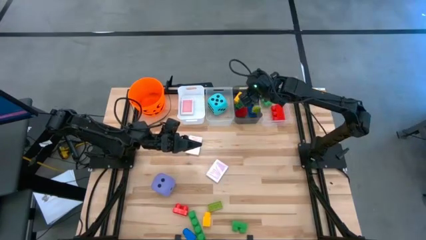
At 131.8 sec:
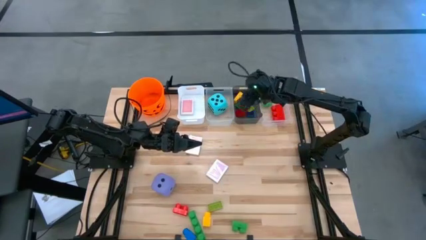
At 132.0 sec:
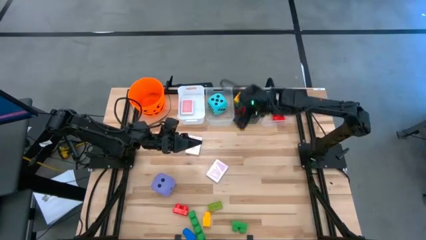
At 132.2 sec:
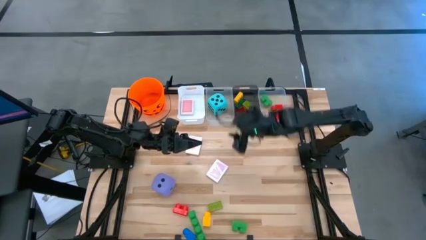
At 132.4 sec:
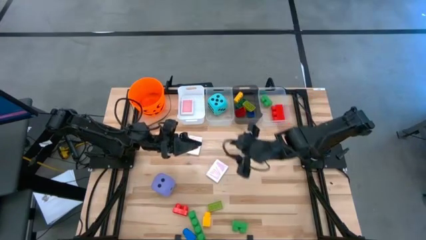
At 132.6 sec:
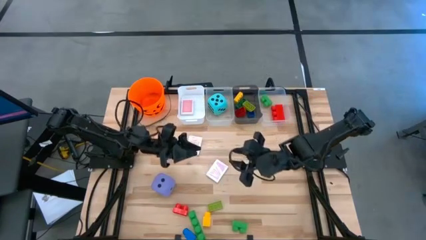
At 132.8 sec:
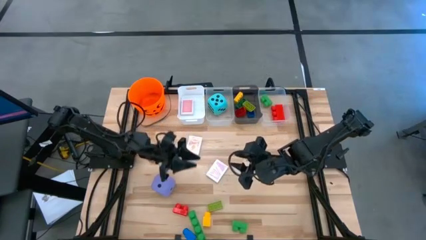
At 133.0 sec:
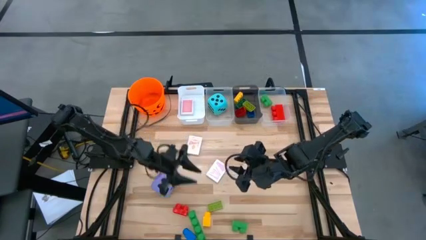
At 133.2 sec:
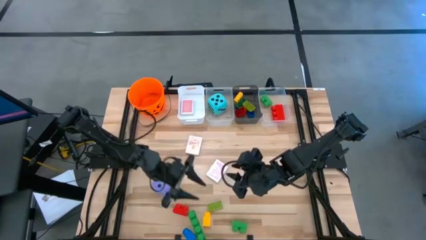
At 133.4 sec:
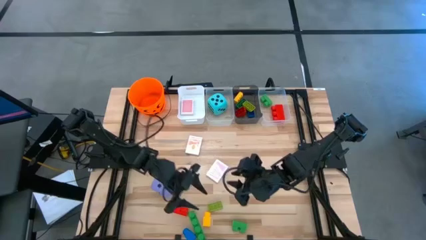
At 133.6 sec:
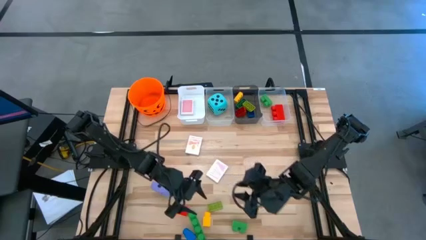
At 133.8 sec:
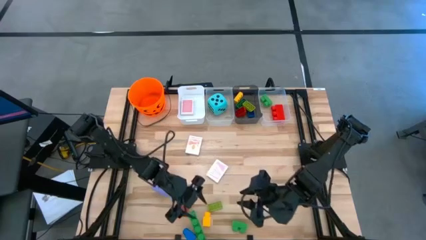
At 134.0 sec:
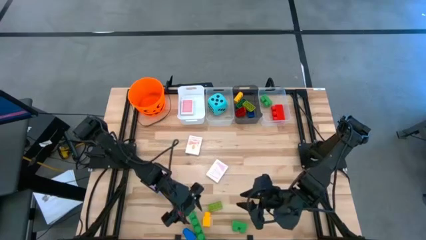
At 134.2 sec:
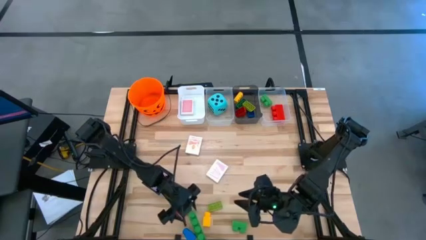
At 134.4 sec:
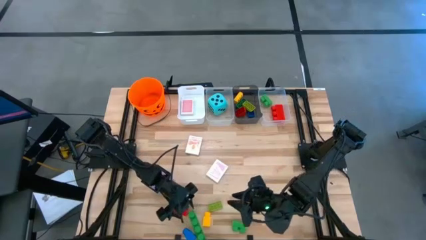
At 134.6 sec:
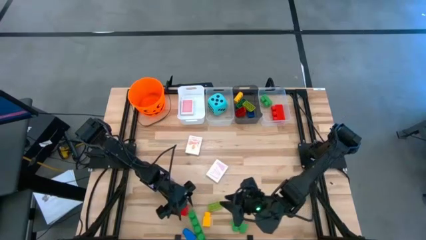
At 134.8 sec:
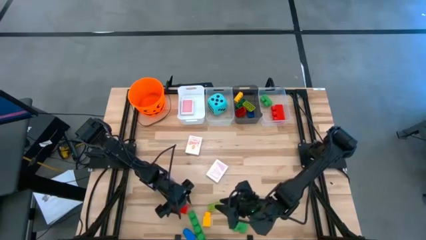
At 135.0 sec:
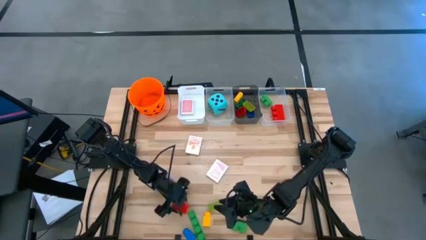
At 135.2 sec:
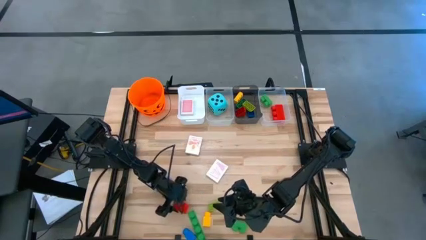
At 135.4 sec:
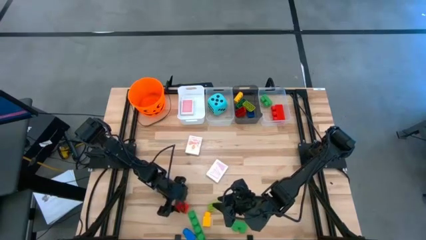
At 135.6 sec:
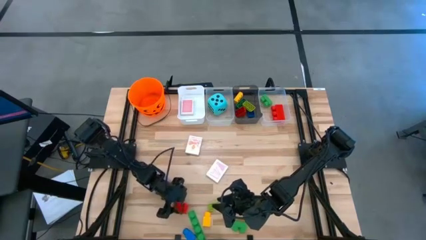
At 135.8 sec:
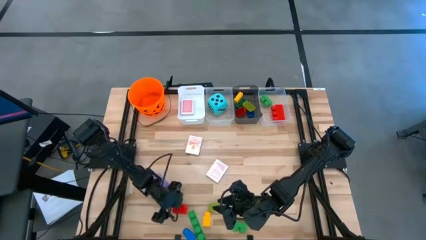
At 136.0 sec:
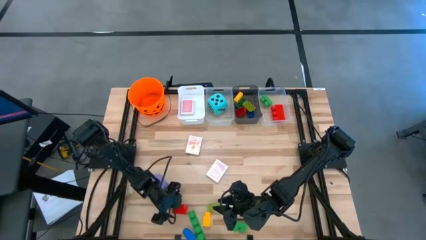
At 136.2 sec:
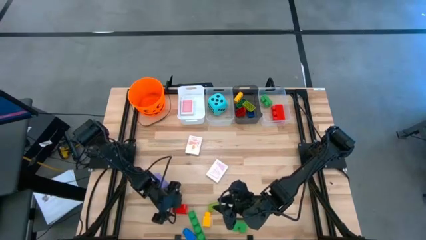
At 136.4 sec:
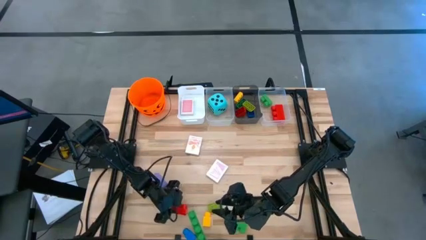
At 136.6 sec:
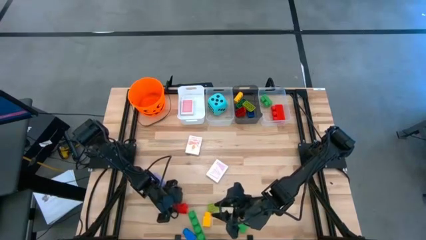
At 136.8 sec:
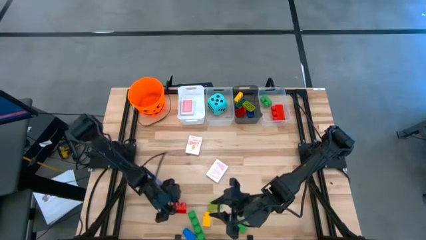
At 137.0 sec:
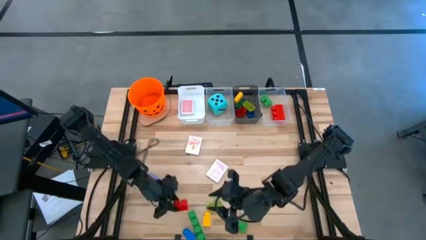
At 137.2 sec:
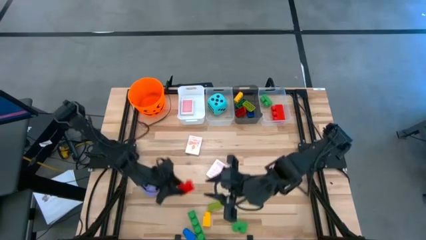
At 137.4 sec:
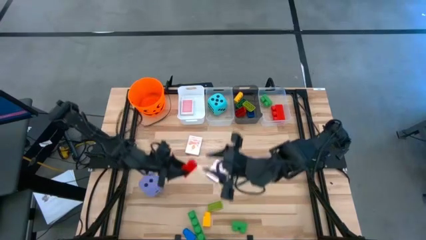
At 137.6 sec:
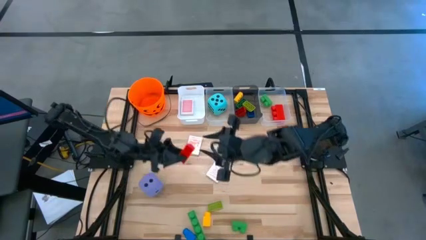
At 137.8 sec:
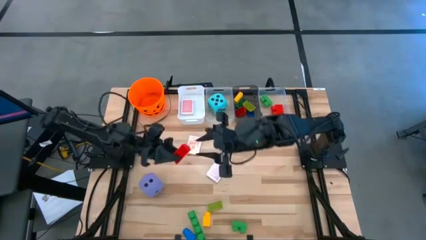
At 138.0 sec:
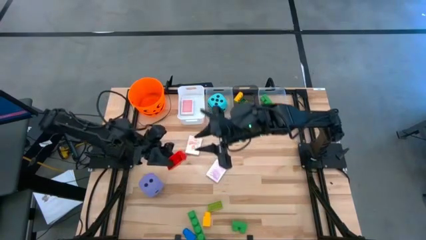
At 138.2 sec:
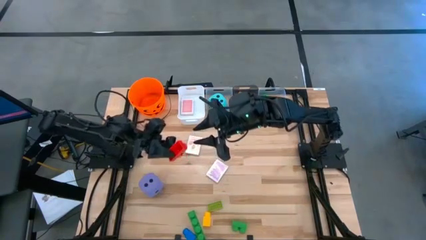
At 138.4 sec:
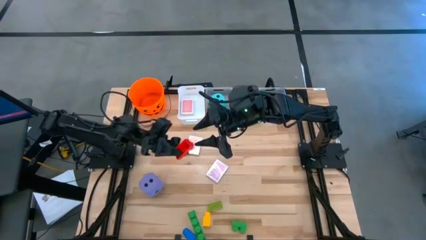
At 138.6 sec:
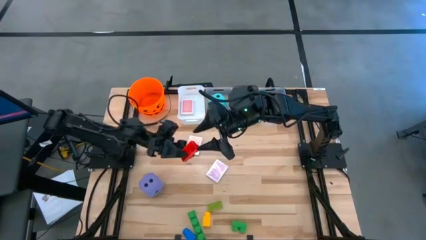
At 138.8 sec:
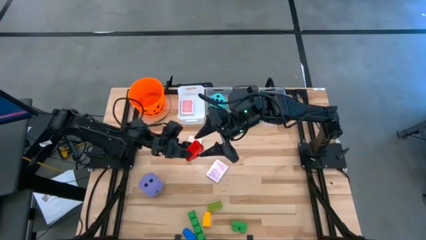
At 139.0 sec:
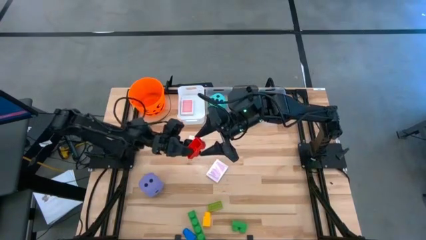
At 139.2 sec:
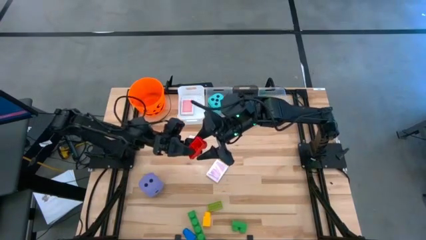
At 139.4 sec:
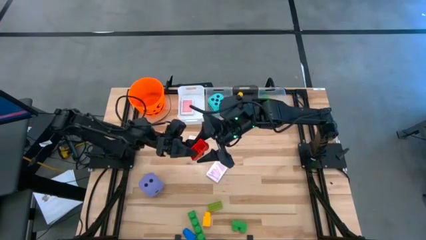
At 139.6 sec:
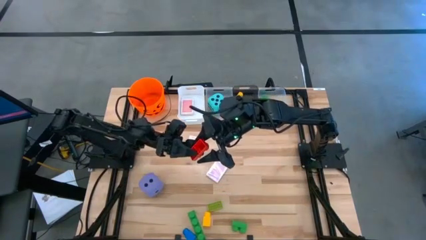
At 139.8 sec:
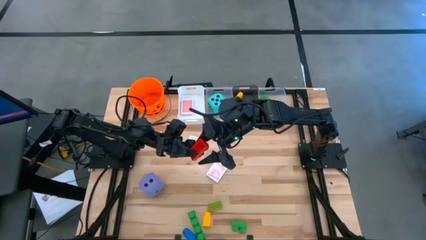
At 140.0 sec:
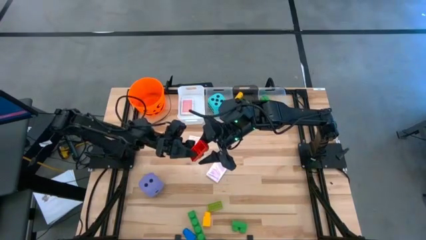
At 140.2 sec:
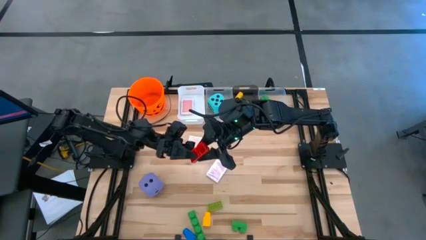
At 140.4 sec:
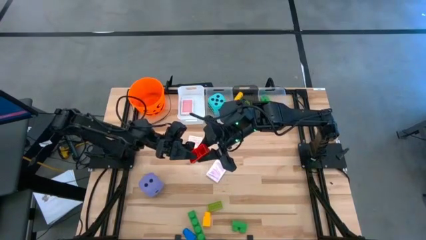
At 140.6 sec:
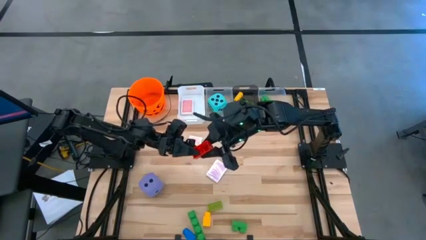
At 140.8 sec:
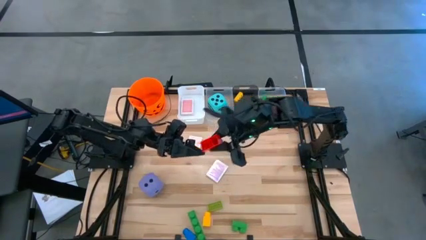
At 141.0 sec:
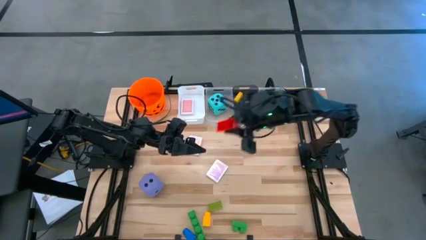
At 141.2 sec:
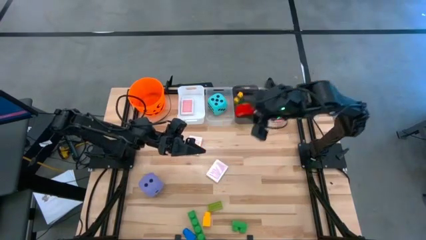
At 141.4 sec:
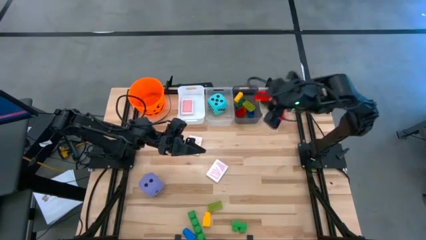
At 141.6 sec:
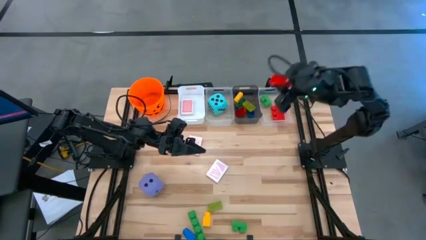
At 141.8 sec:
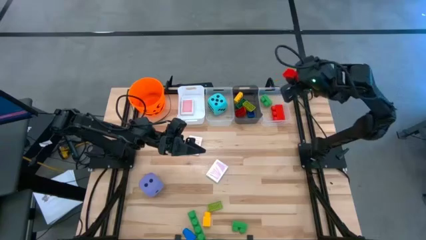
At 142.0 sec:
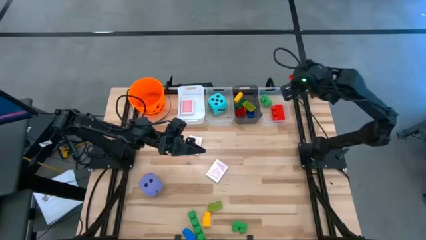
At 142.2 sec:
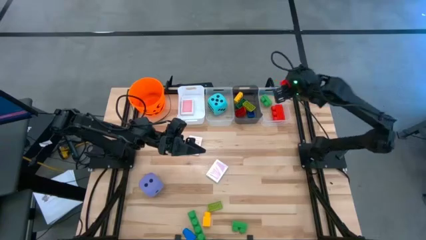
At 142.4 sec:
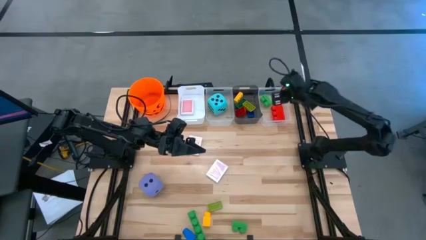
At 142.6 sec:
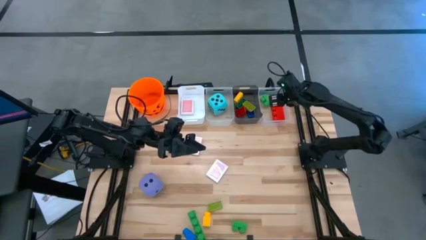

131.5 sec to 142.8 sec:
Task: Pick & Place Toys
Put the large red game piece into the right transparent bin

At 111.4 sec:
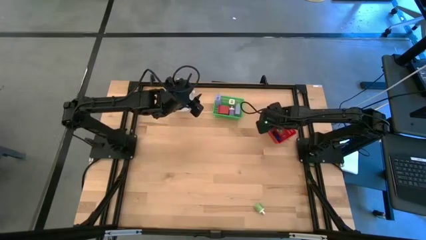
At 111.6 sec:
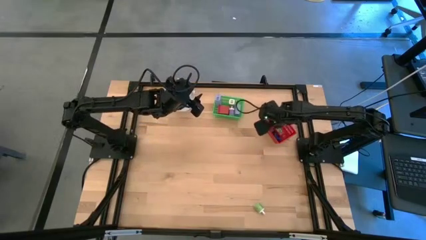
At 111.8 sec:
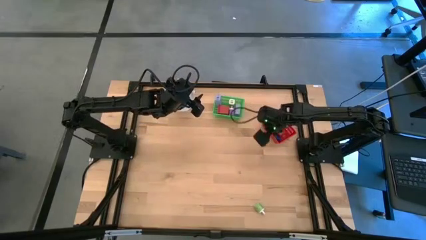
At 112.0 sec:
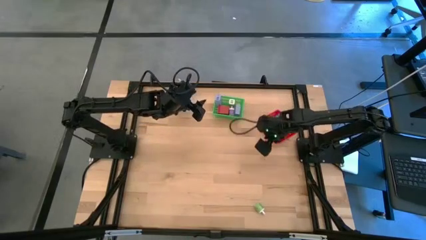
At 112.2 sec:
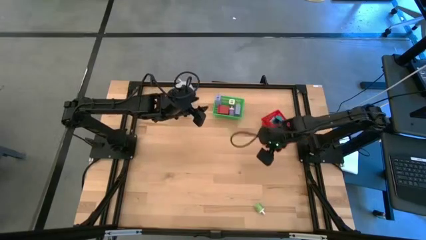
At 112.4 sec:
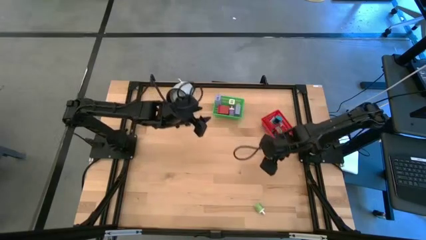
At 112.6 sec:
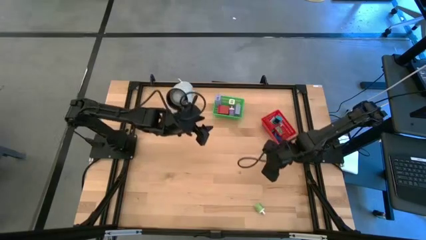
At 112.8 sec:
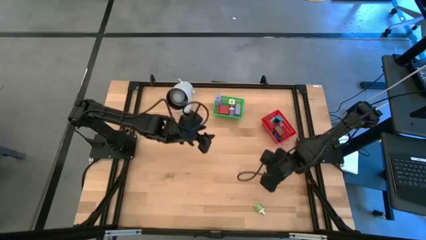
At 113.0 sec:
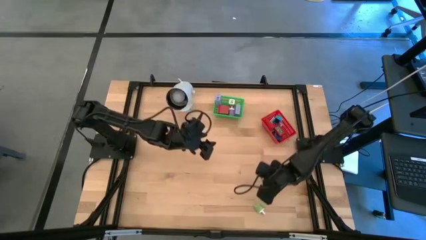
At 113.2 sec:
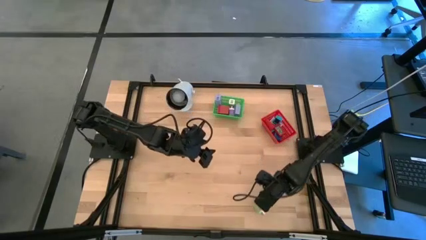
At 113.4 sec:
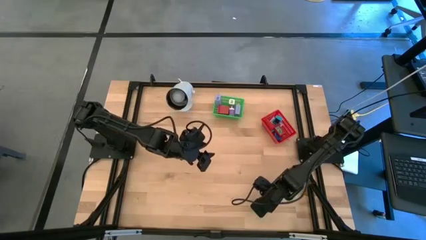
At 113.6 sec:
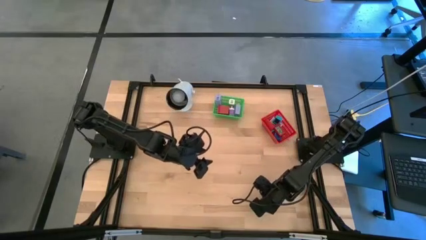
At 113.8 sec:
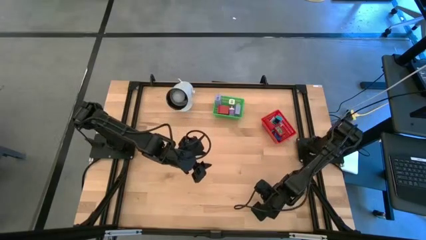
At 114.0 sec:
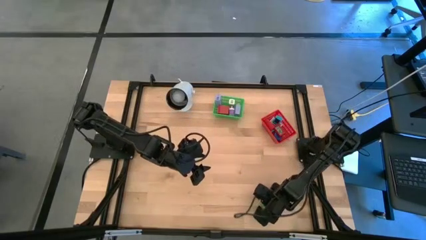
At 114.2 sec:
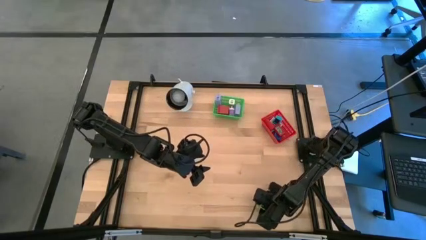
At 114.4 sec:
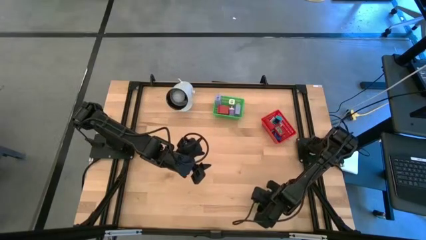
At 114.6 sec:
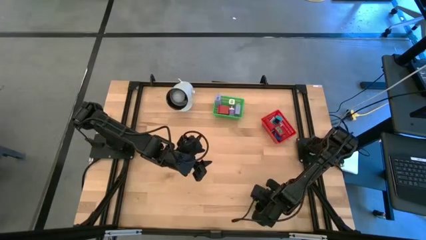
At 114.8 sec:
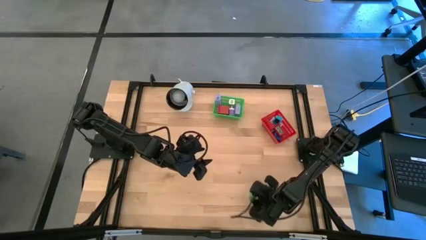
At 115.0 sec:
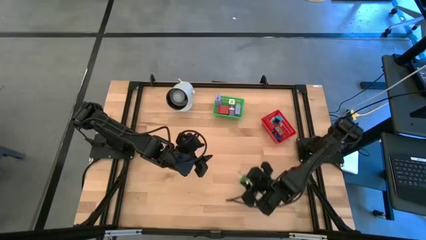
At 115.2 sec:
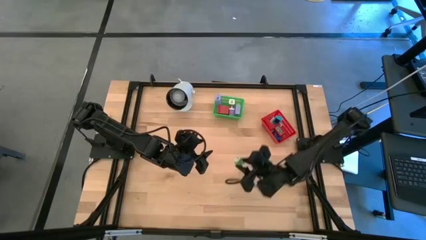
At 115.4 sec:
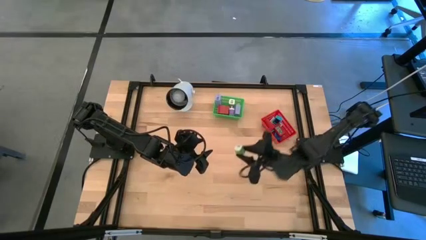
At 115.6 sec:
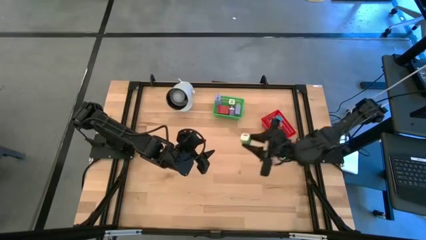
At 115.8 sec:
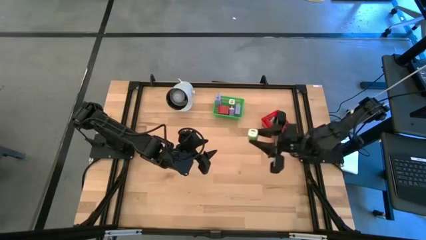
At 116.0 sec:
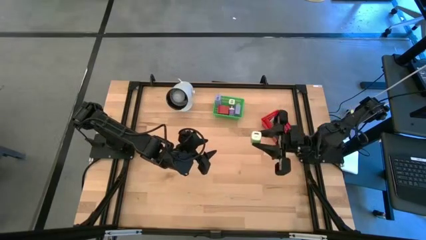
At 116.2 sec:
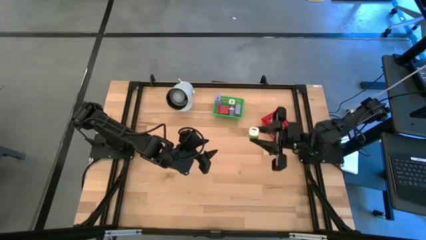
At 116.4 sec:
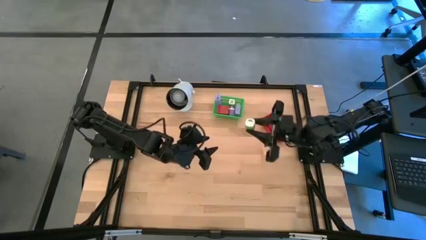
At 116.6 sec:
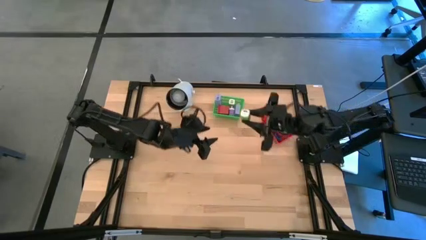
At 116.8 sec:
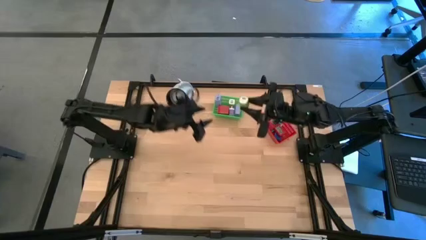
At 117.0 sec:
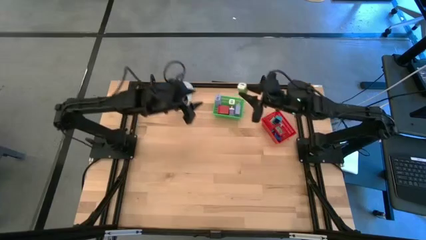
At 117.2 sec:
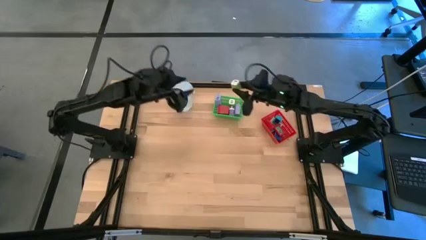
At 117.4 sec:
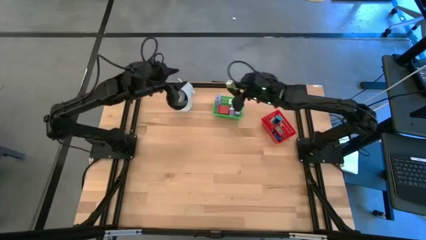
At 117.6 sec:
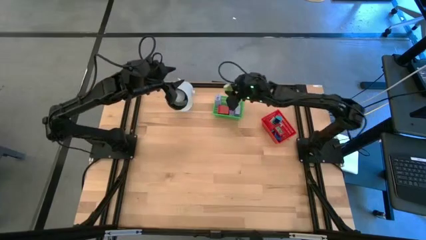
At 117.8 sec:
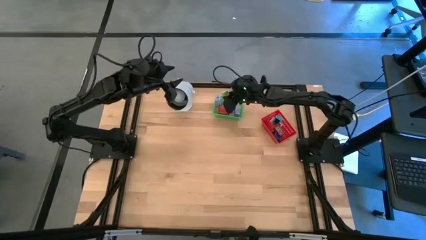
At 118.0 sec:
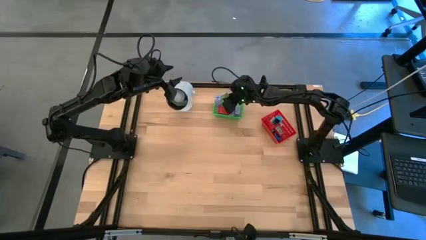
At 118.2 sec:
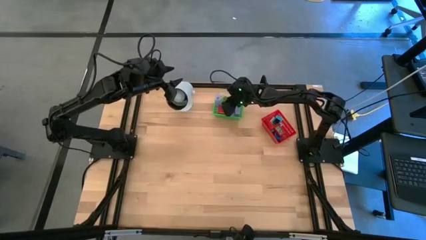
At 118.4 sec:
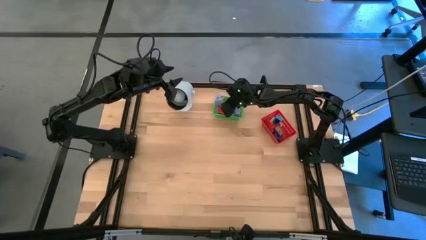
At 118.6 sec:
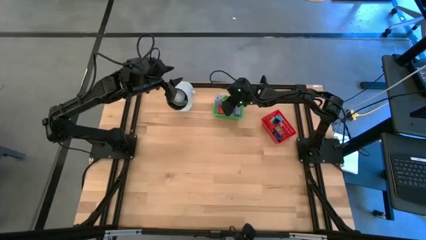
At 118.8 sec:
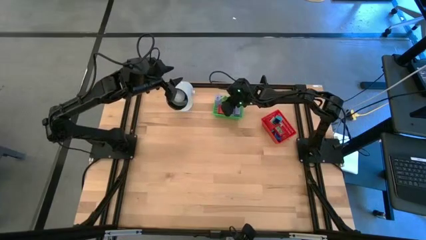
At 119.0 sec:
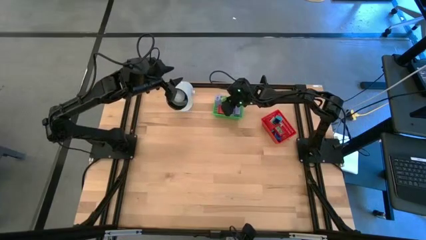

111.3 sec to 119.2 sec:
Task: Pick & Place Office items
Put the green charger adapter into the green bin
